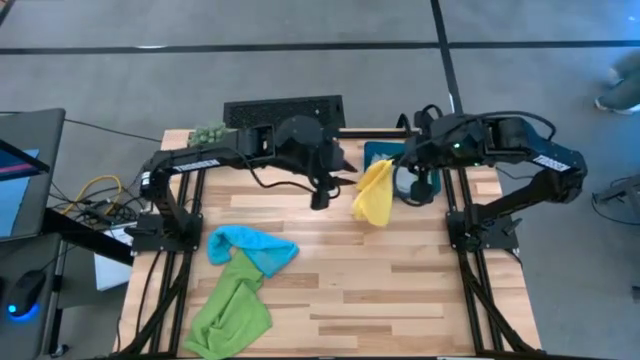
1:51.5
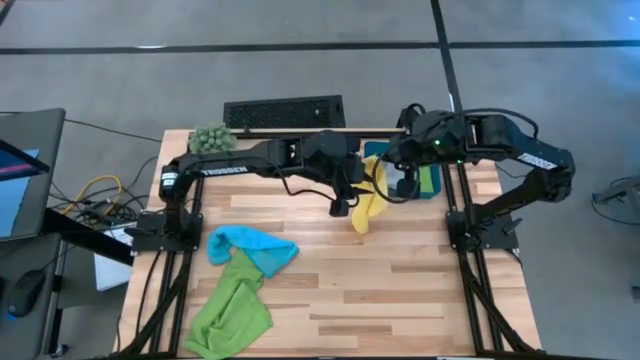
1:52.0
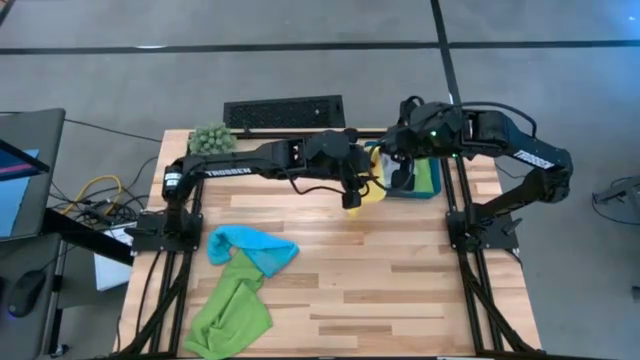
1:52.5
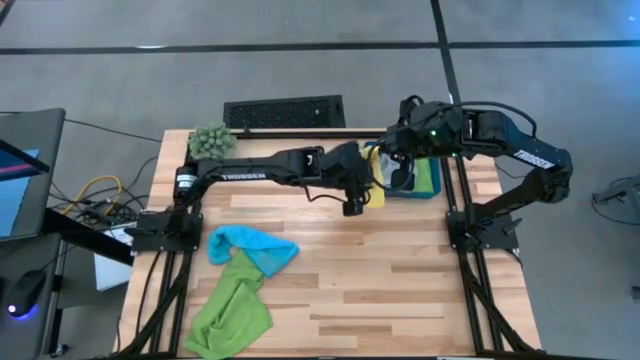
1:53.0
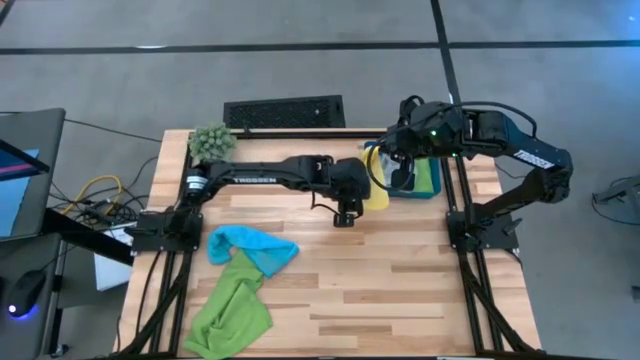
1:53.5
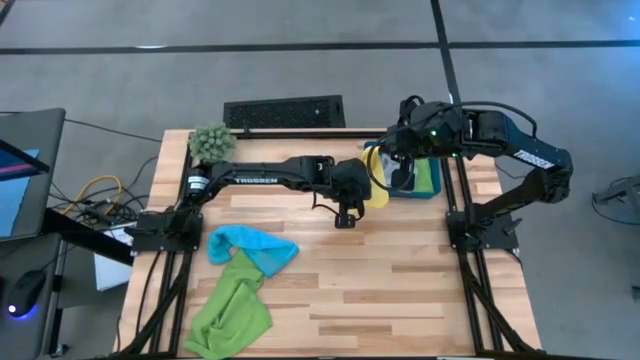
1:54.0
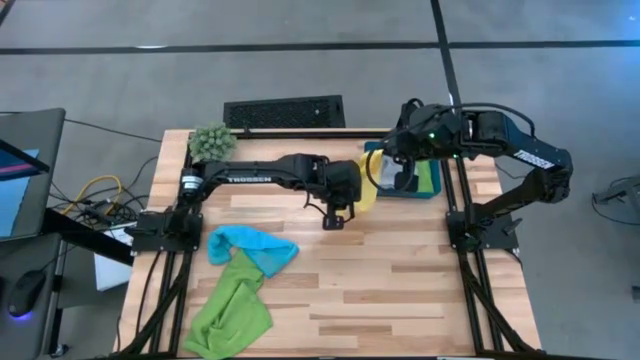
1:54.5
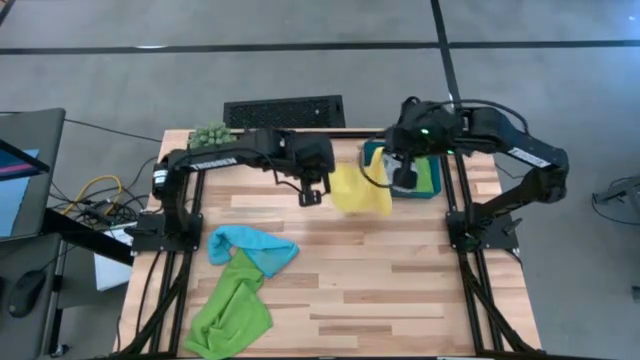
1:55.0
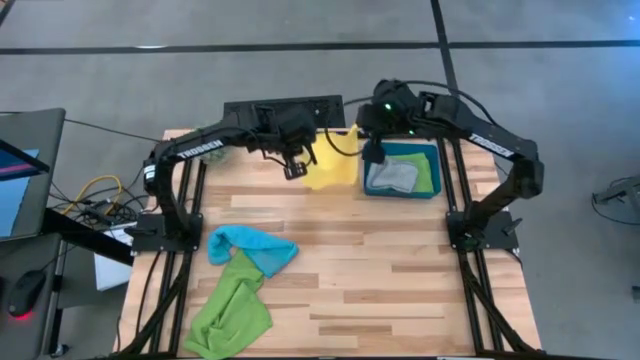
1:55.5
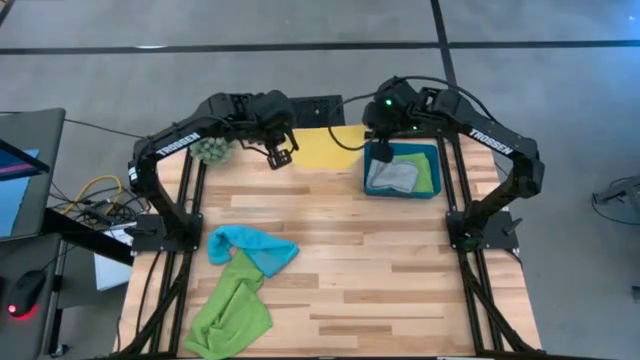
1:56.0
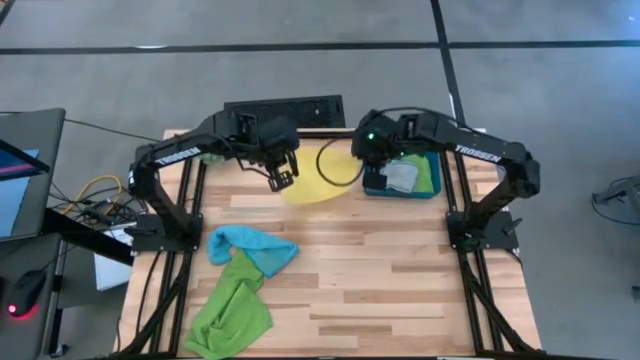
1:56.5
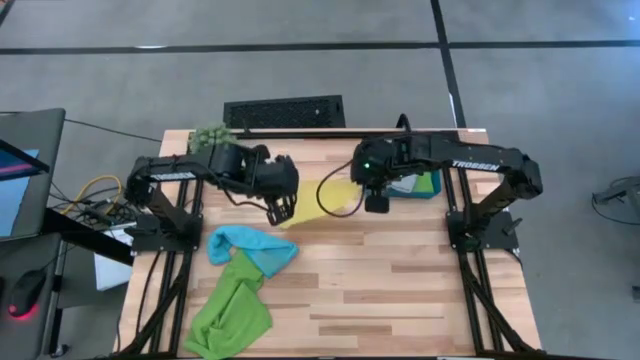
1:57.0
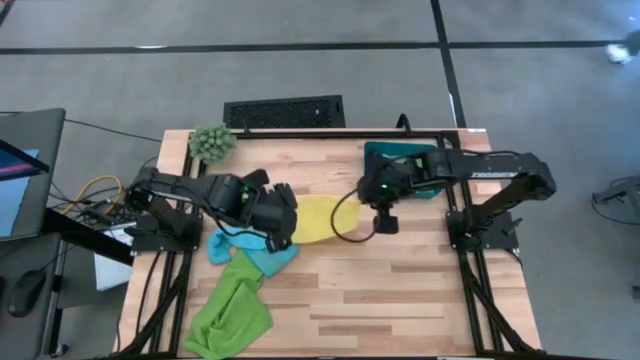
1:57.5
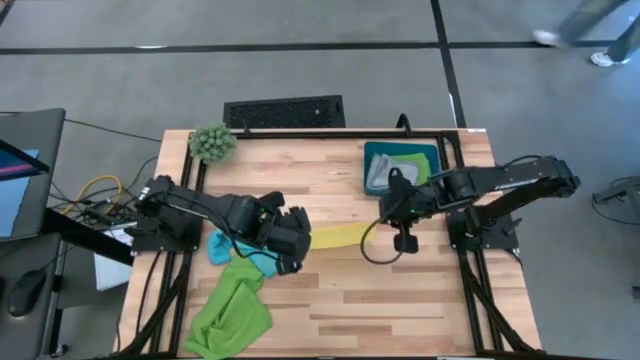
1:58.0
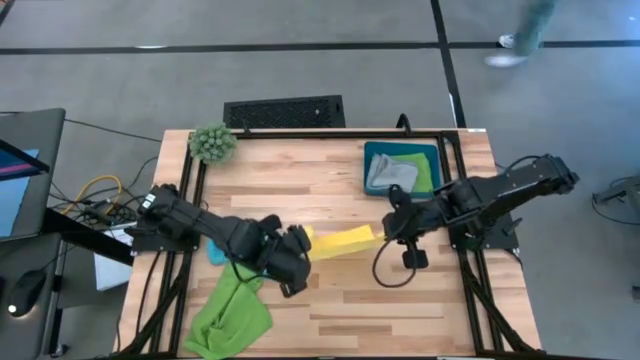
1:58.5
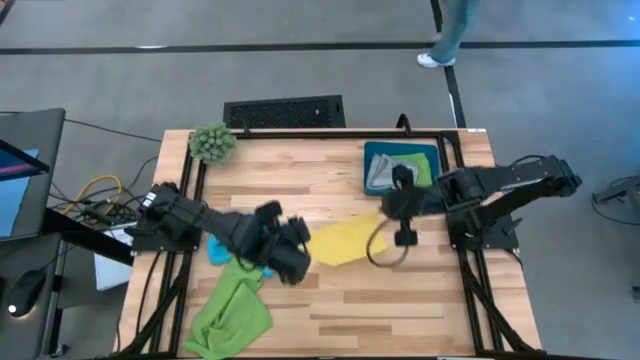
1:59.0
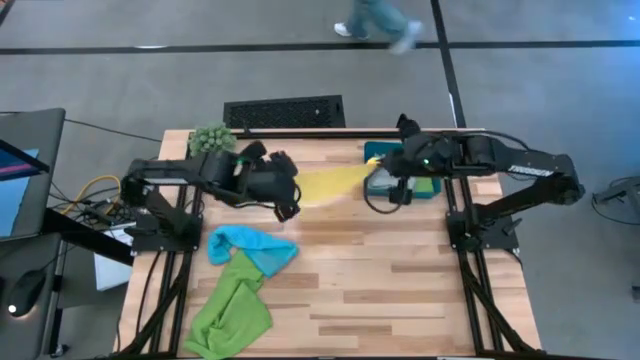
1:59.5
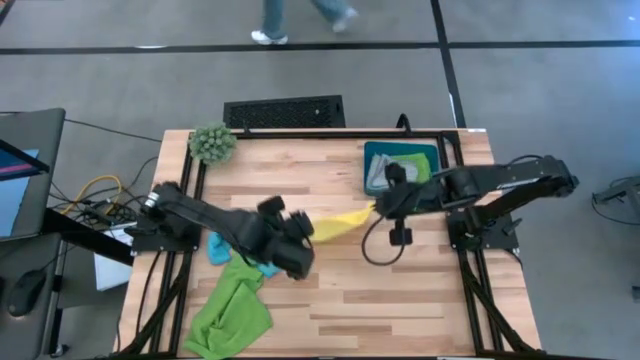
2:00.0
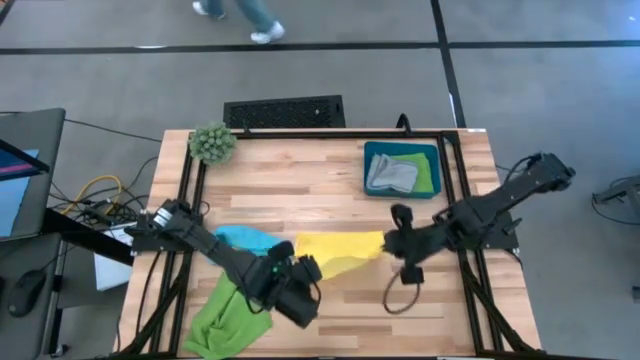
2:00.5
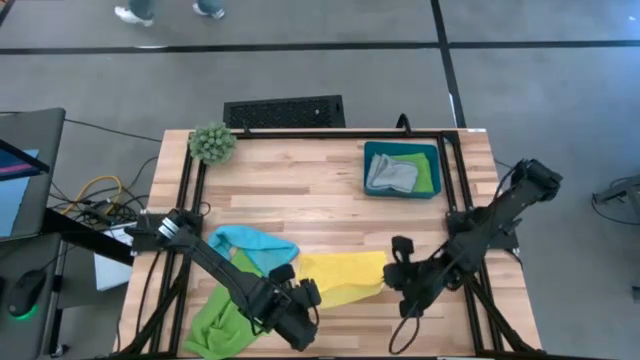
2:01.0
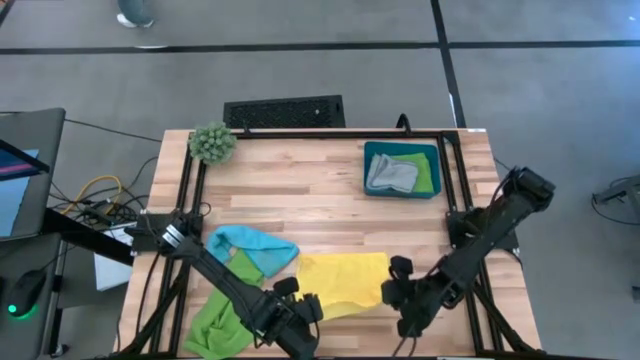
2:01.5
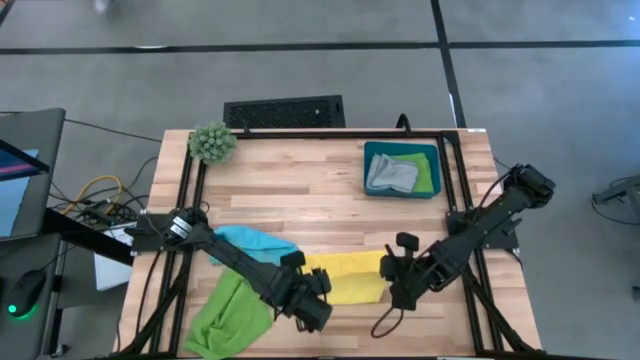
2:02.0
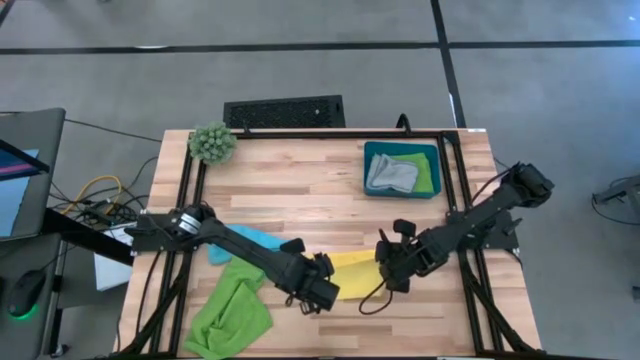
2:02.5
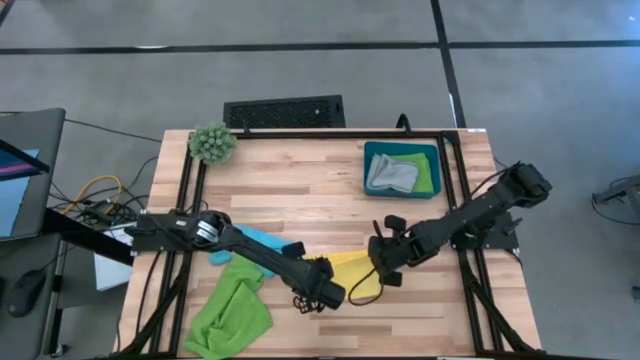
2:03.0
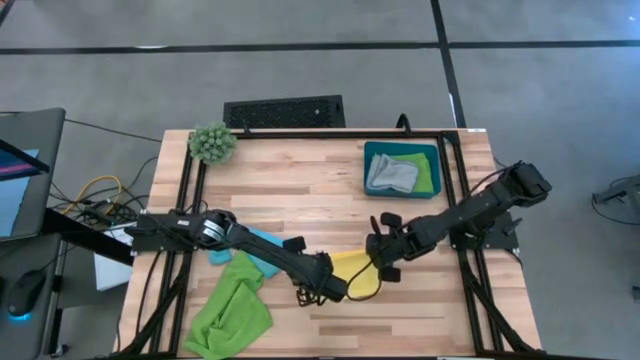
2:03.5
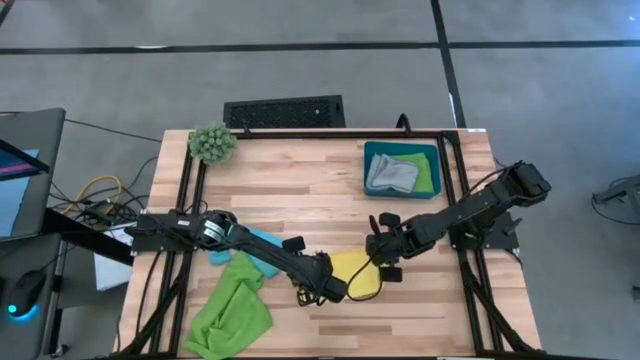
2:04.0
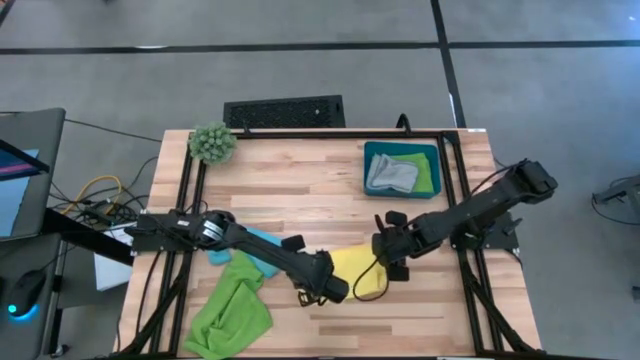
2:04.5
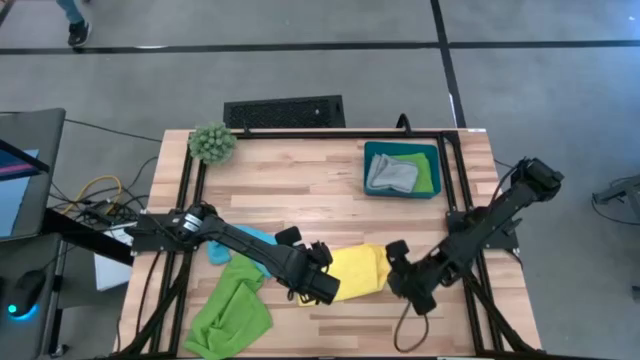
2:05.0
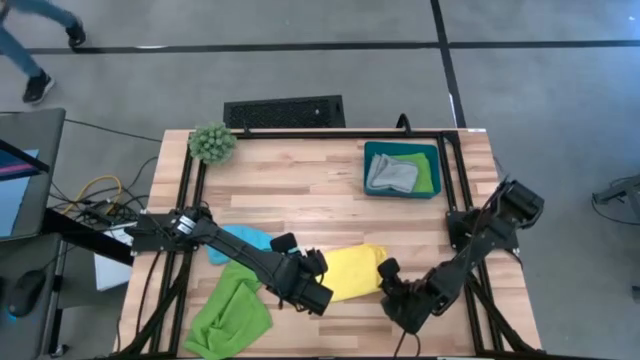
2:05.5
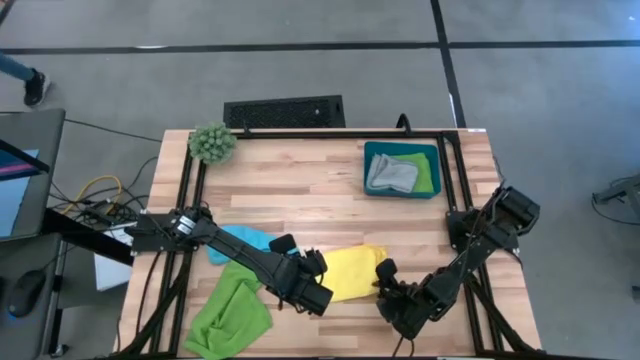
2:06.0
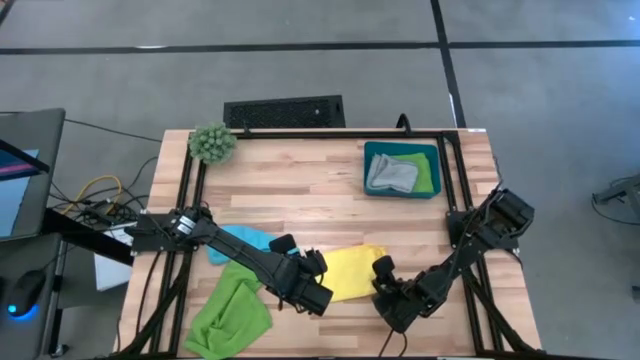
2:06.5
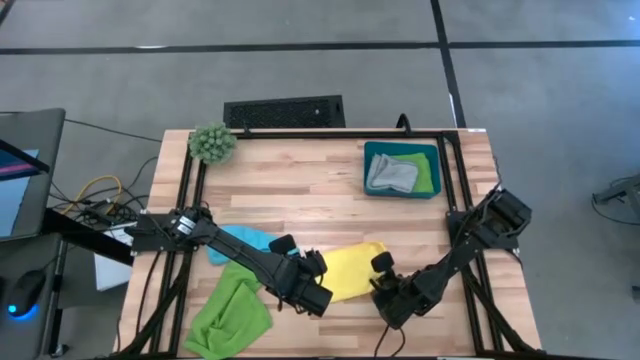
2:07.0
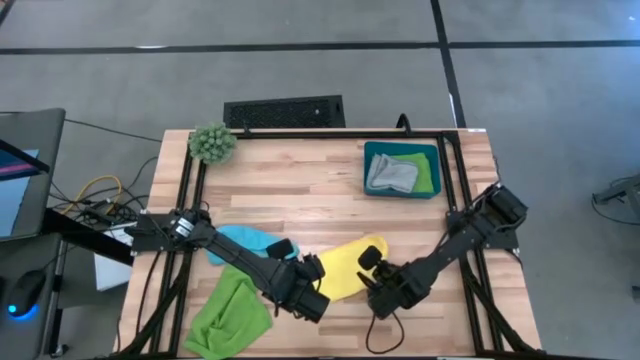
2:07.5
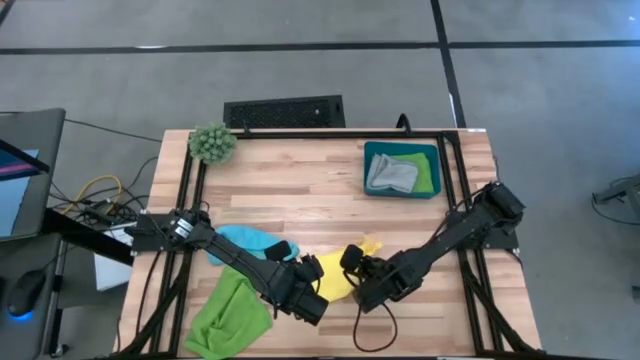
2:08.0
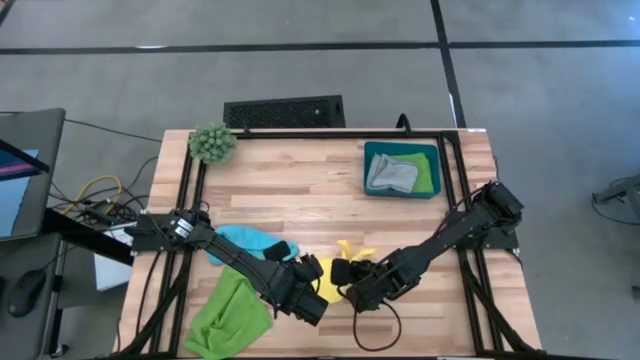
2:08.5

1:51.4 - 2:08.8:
Task: Fold microfiber towels
Fold the yellow microfiber cloth

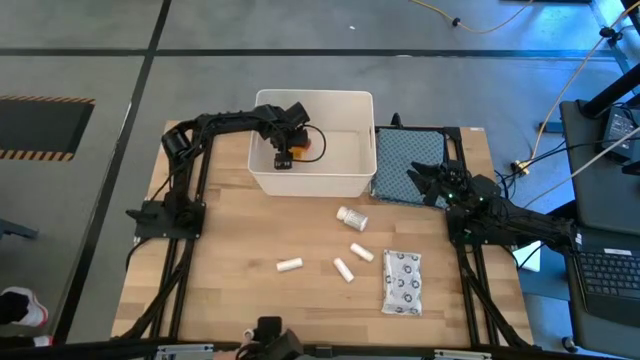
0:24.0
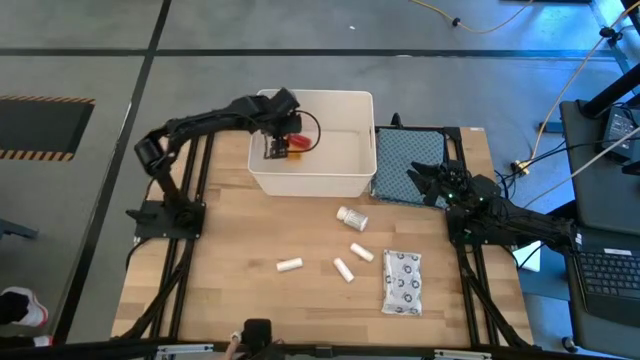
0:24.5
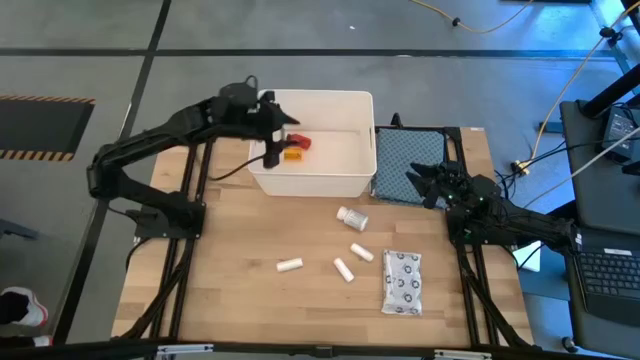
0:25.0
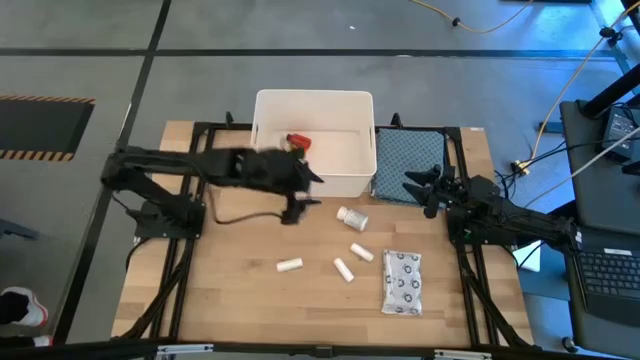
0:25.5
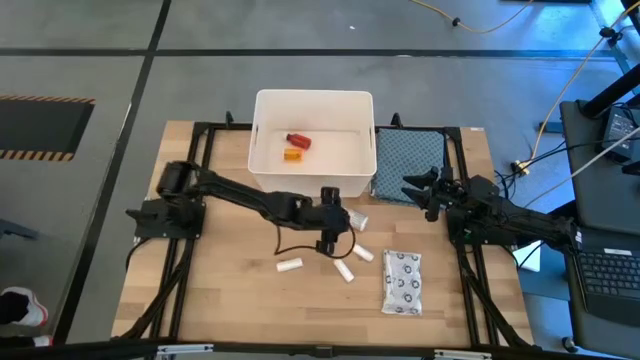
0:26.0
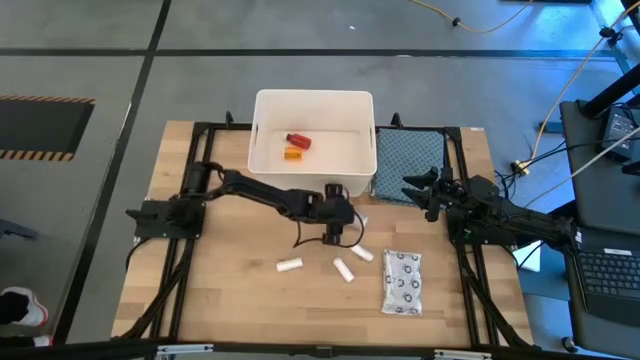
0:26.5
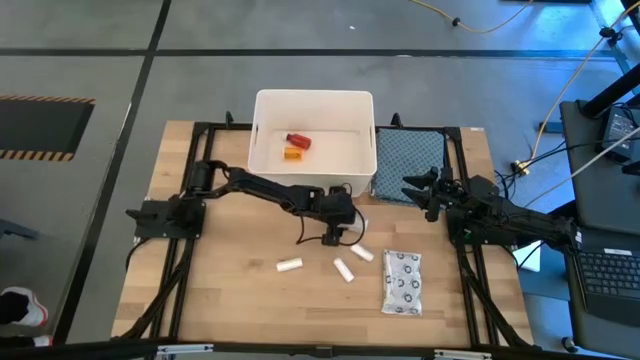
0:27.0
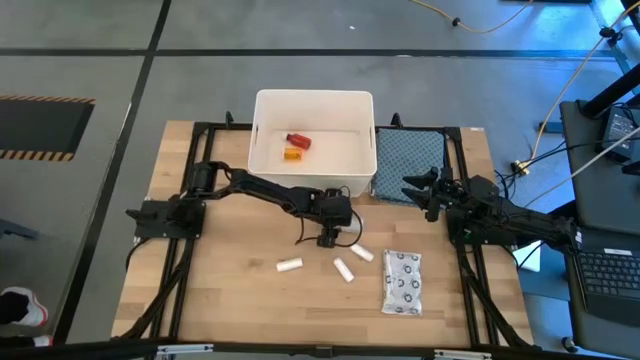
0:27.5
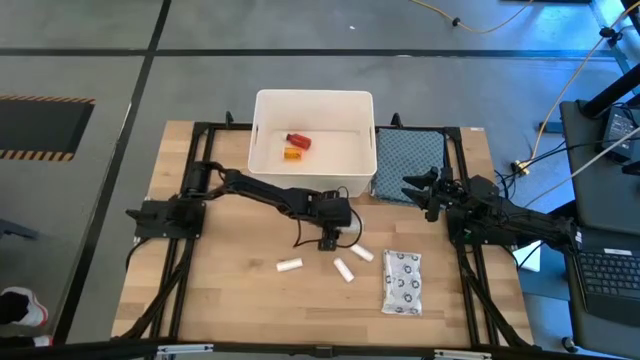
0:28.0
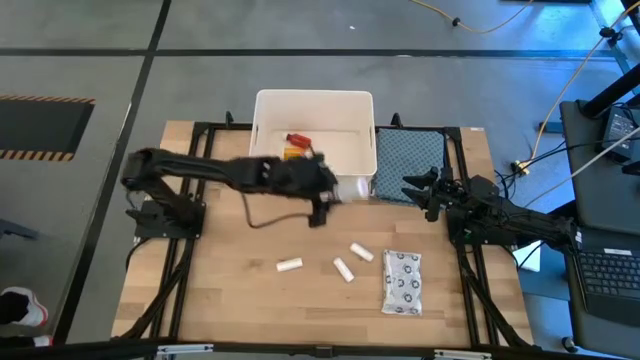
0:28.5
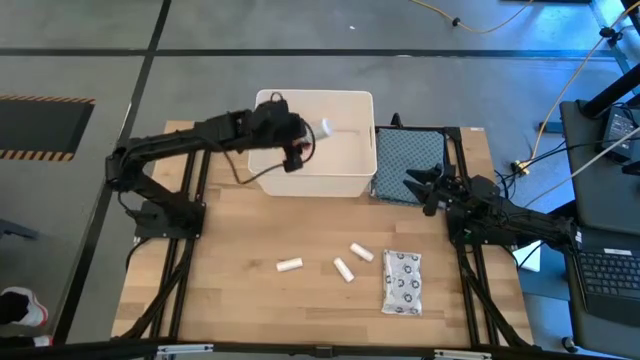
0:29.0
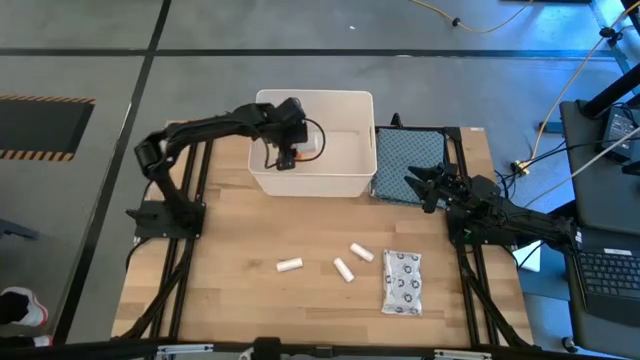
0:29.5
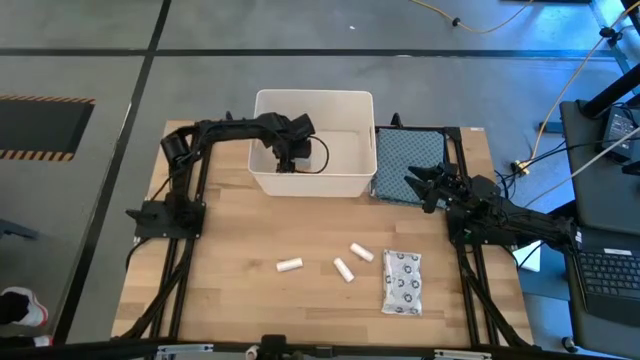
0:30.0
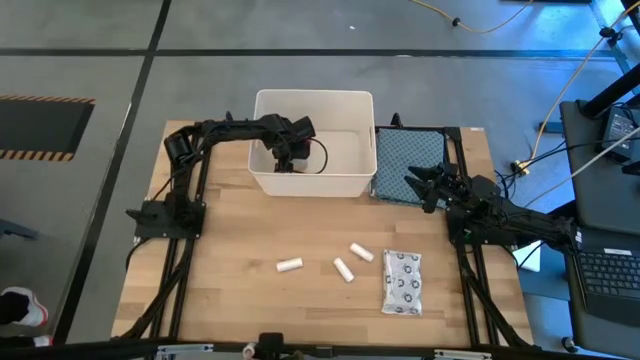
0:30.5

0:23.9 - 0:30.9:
Task: Pick & place medical supplies in basket/bin
Put the white medicine bottle into the white bin
